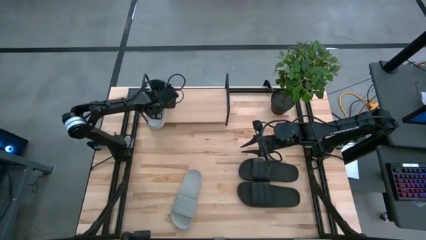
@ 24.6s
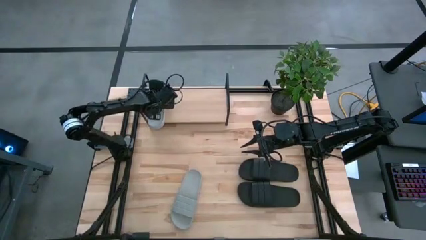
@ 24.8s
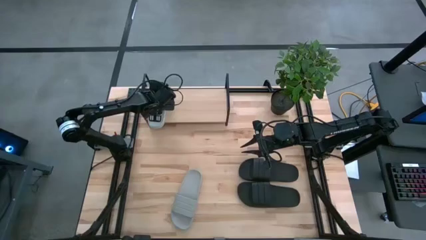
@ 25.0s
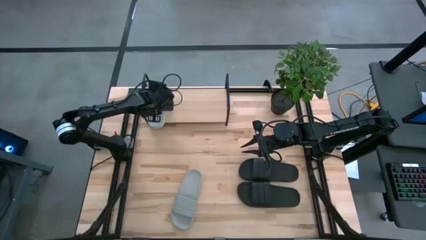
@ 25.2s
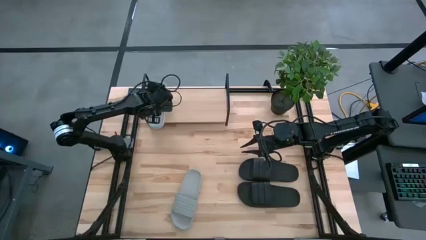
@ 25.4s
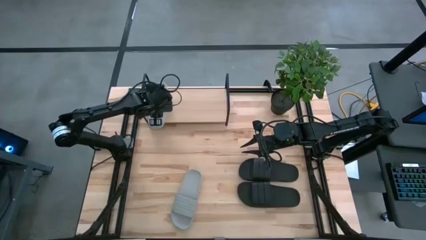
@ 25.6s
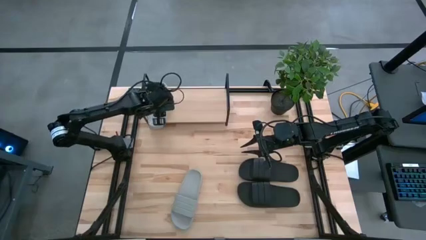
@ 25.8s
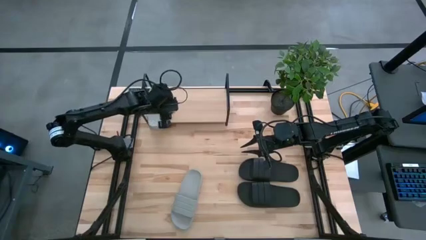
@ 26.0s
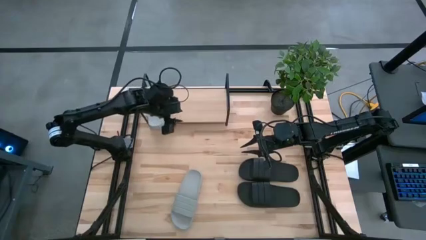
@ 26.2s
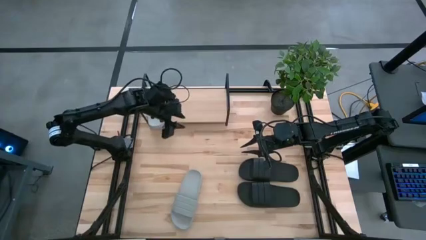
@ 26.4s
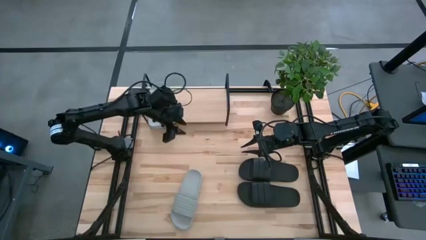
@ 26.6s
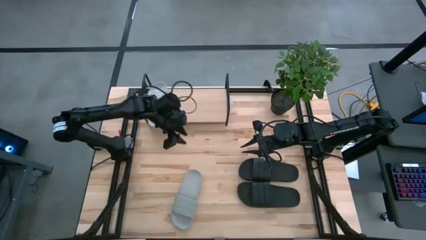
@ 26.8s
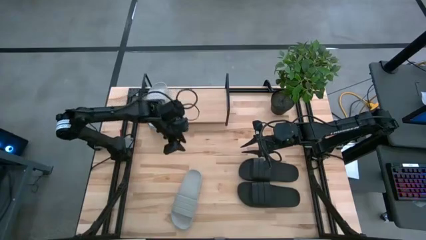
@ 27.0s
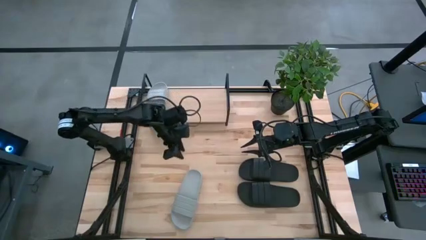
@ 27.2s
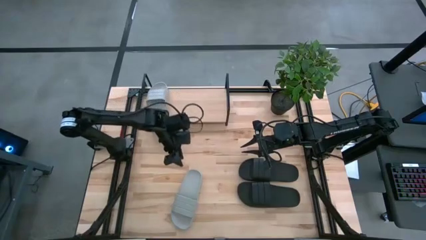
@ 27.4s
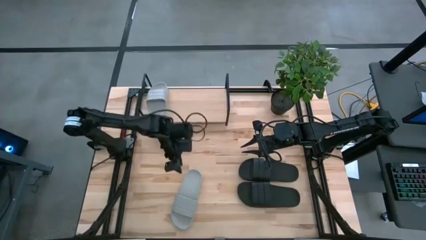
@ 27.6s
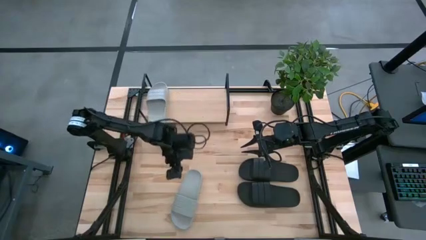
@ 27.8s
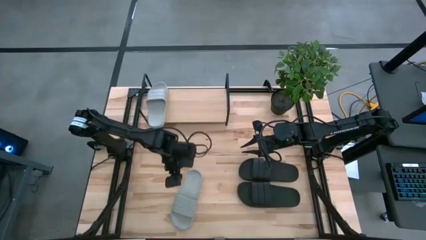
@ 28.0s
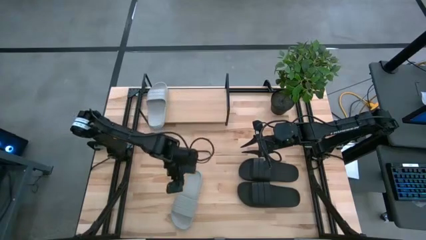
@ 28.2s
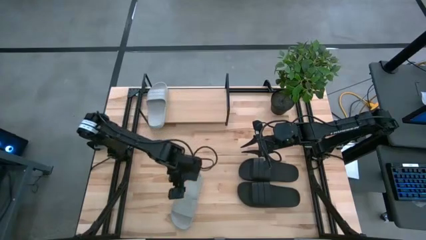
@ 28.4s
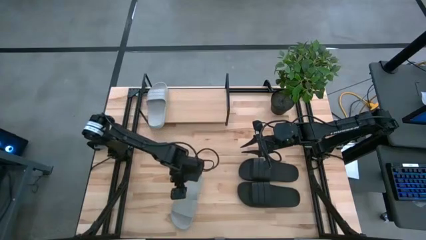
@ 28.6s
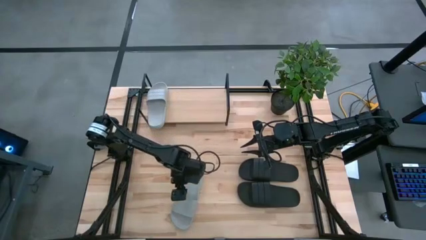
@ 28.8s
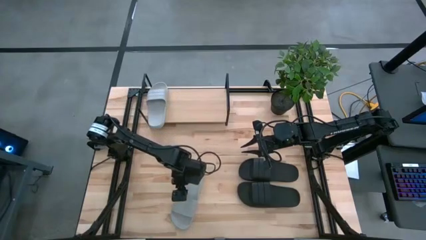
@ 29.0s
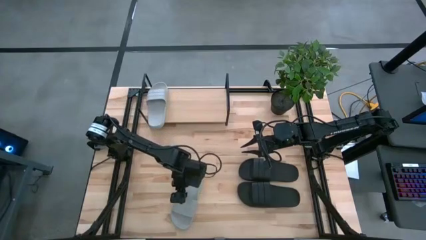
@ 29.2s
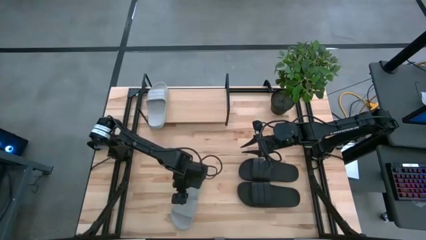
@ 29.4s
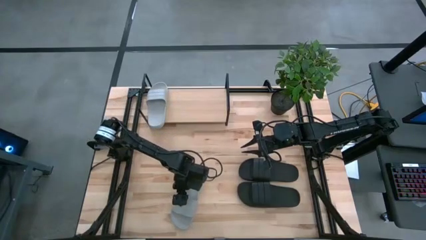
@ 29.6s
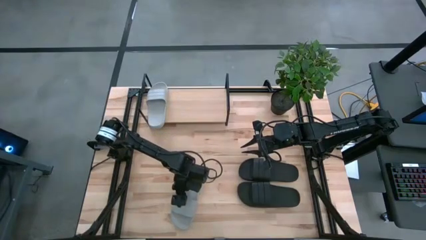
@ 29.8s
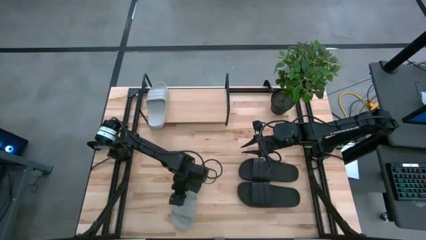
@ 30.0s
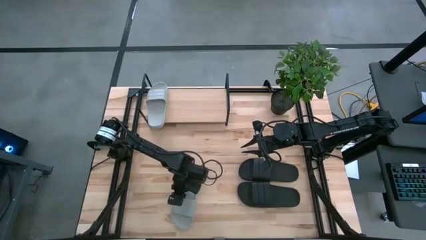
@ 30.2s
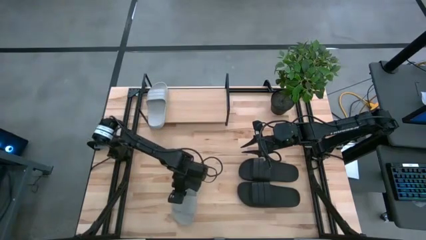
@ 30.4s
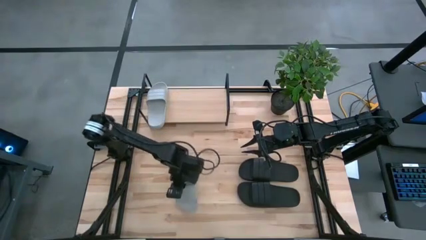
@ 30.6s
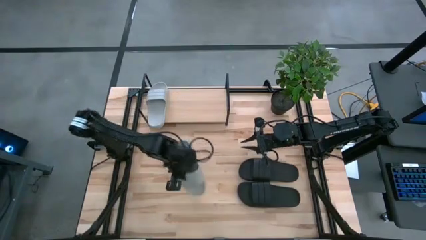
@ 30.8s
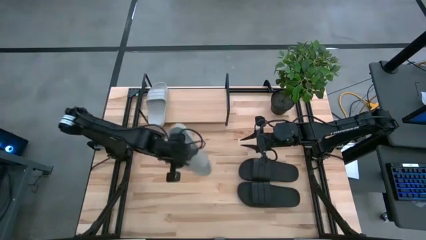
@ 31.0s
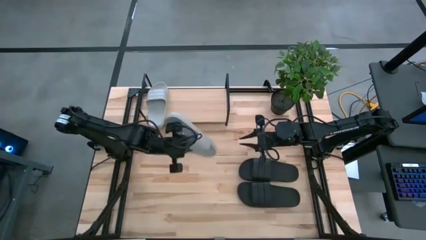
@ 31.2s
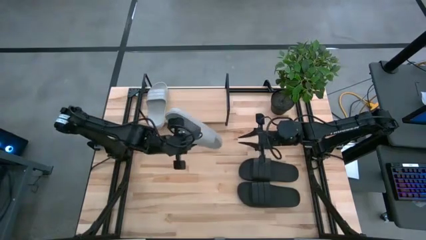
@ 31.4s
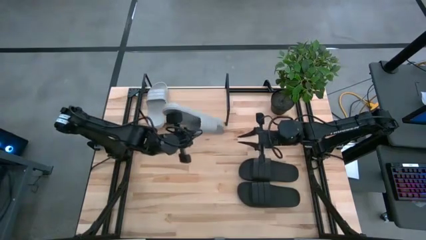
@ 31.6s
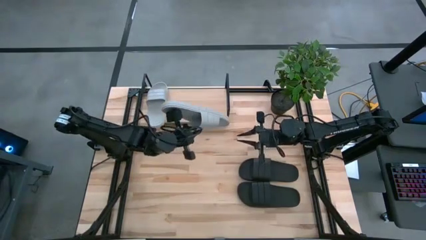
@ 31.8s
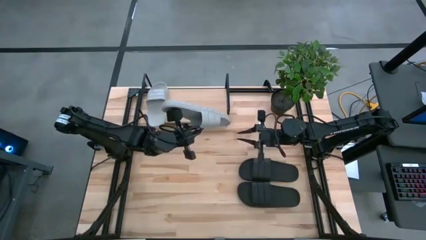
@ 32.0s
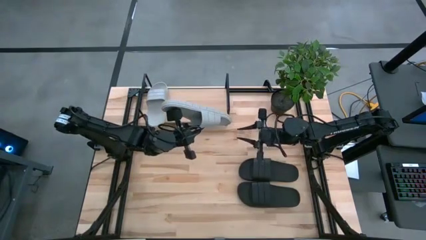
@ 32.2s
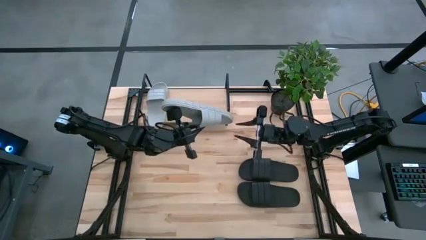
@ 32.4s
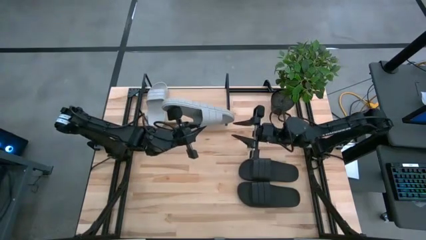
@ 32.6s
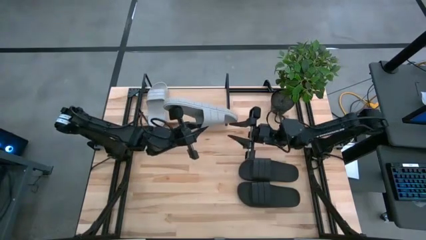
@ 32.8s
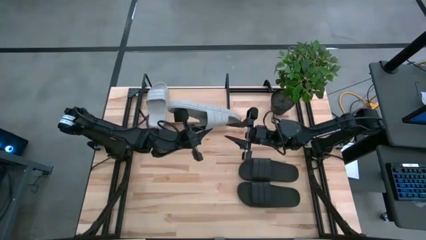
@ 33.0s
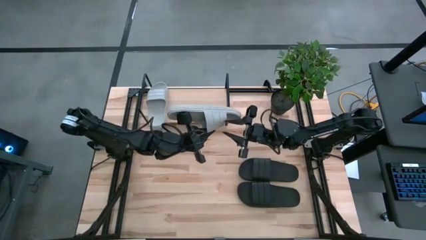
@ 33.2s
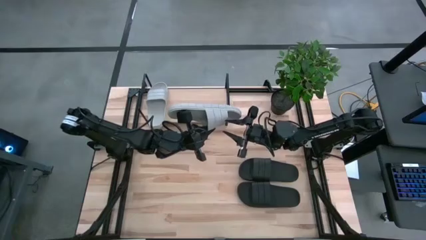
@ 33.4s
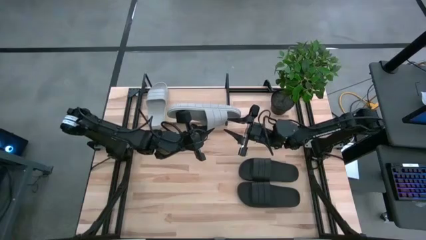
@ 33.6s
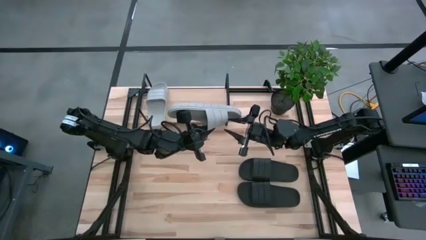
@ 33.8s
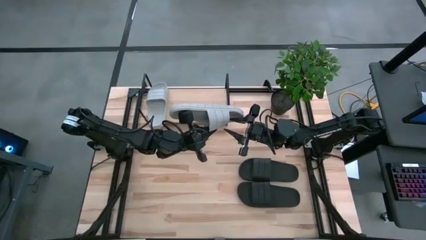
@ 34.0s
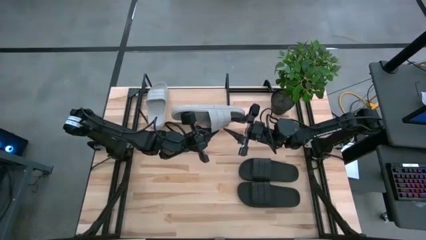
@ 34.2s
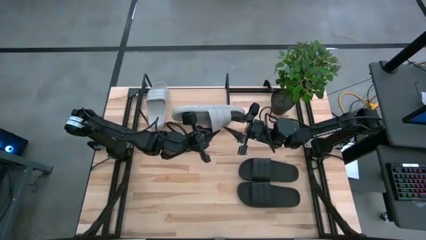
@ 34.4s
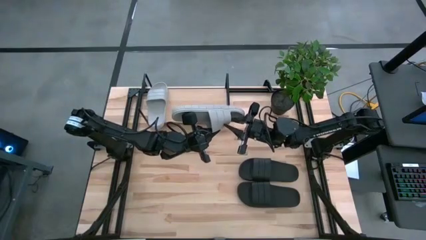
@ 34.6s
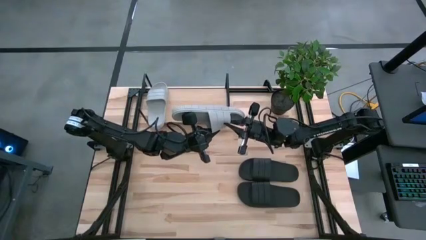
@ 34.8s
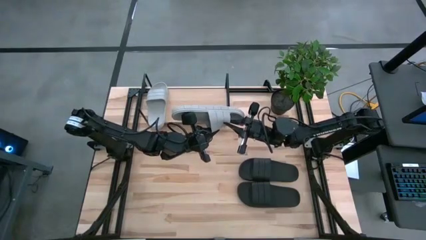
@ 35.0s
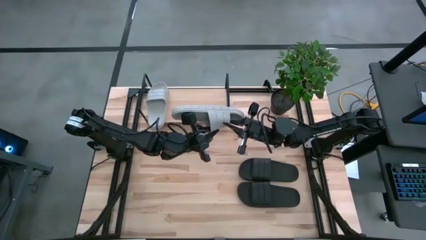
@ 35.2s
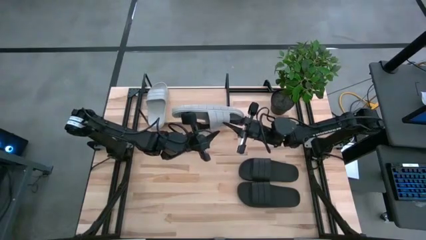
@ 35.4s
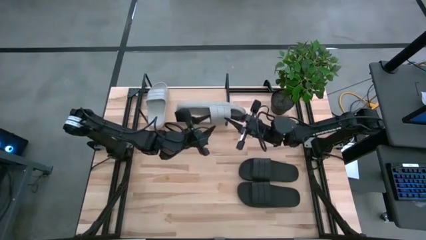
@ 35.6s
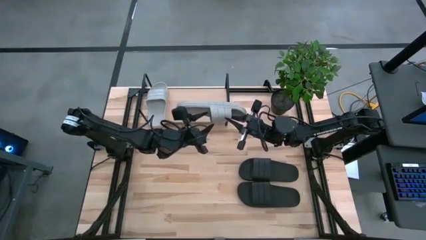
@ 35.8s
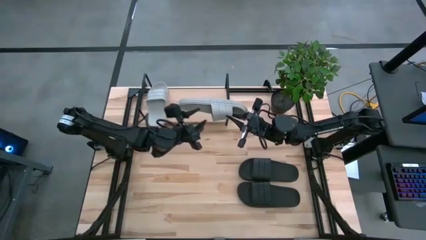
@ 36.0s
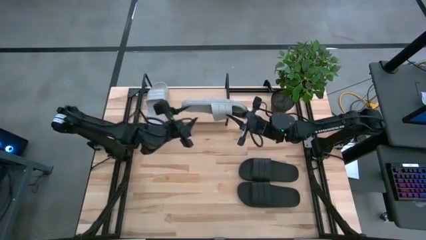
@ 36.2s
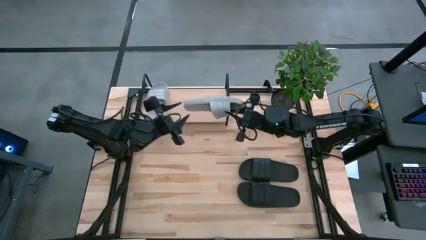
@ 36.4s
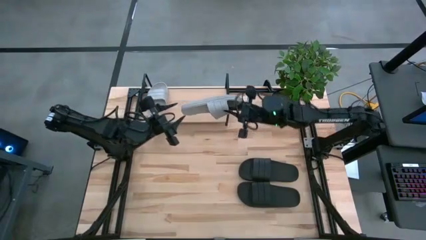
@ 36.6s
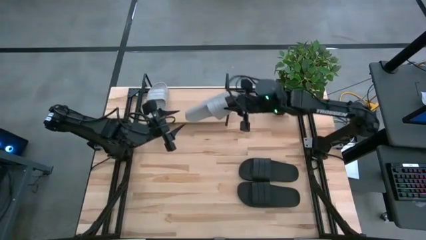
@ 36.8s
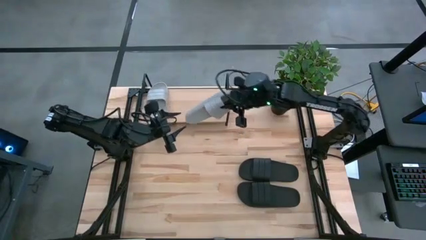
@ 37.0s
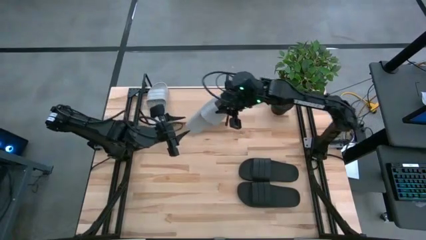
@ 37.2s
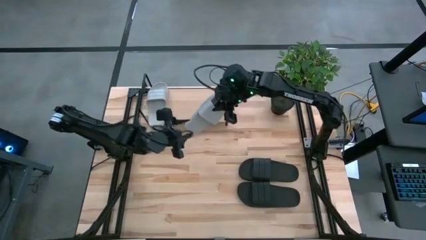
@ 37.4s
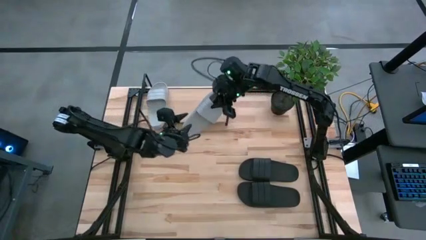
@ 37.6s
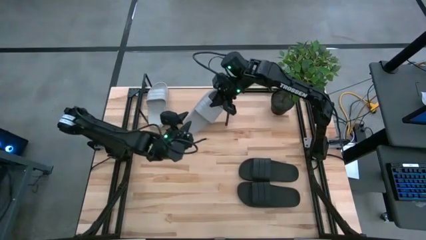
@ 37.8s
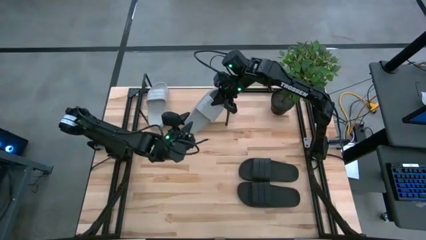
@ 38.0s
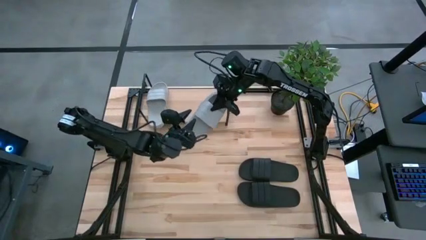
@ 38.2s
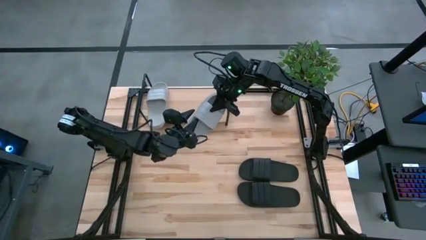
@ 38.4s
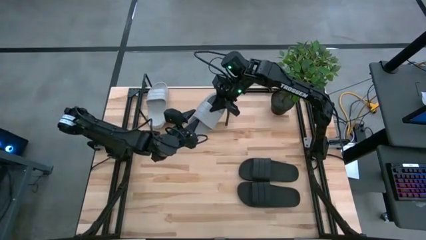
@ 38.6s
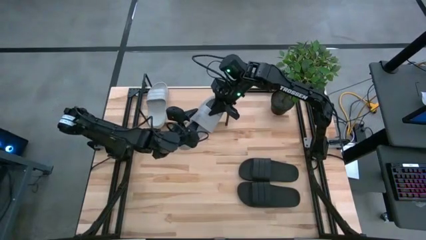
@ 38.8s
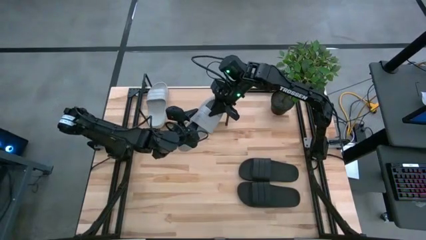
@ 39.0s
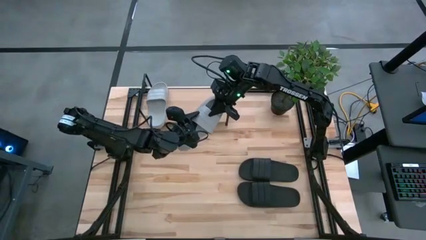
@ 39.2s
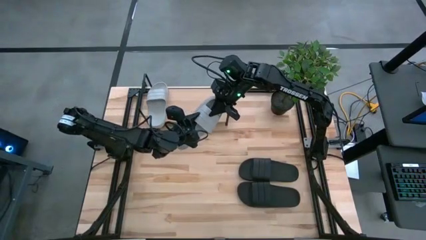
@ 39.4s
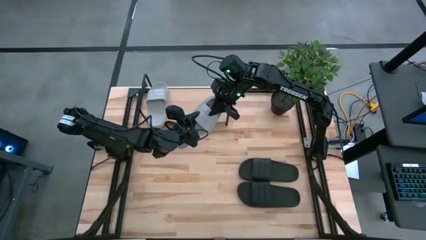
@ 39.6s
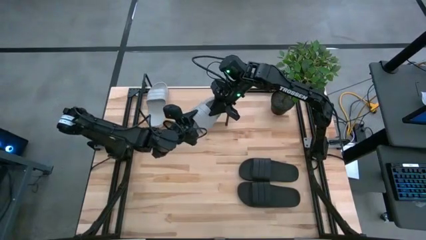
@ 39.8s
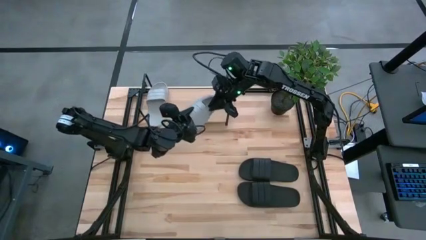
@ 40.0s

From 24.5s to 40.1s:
Task: Pick and place slides into the shelf
Put the gray slides on the shelf
